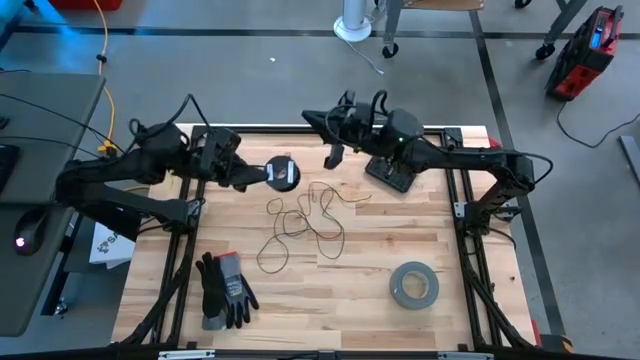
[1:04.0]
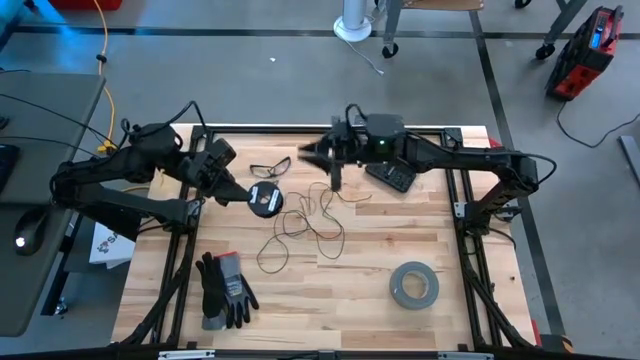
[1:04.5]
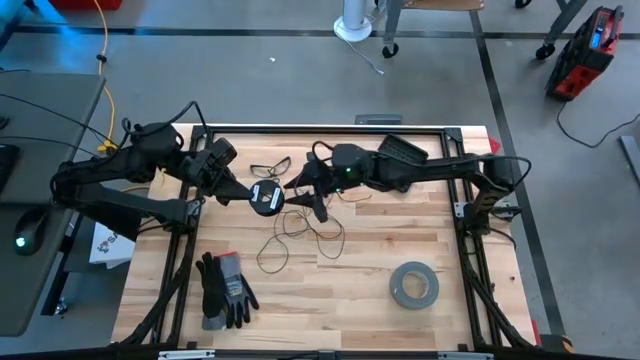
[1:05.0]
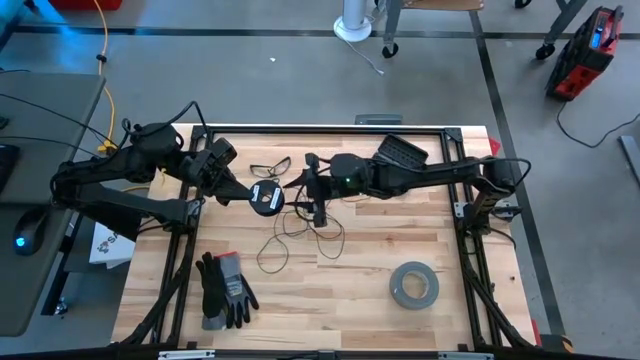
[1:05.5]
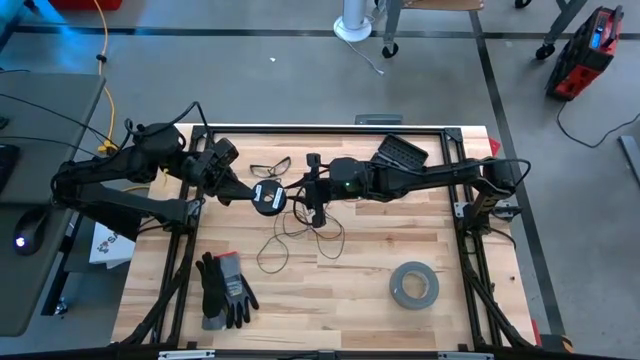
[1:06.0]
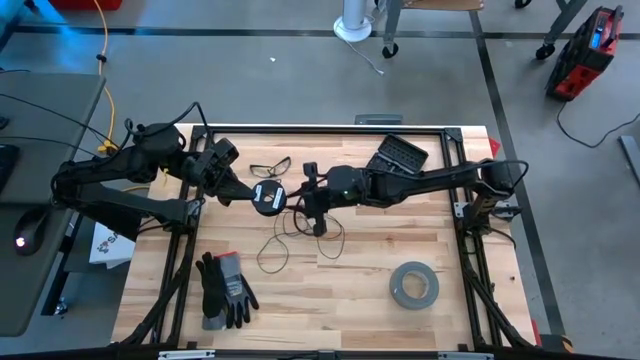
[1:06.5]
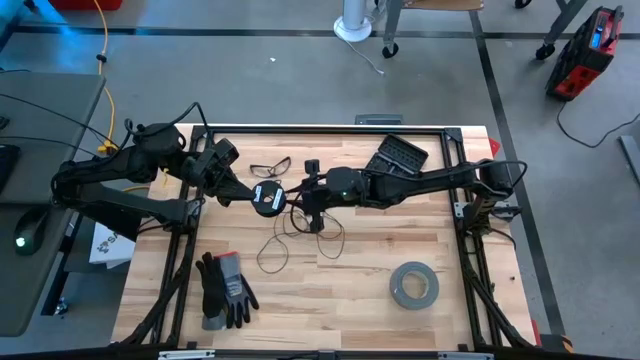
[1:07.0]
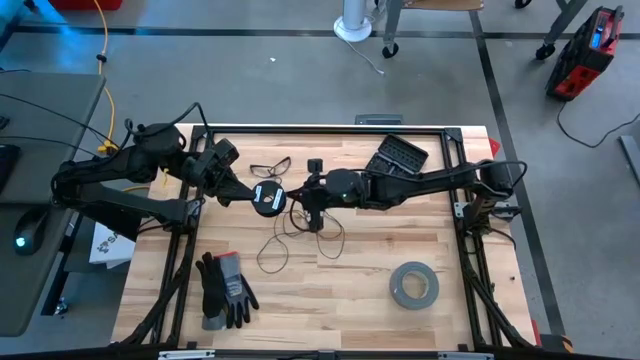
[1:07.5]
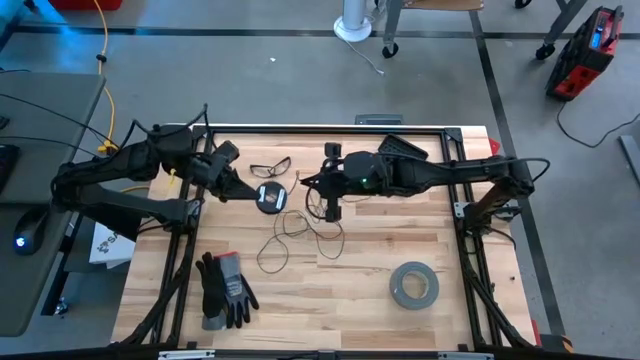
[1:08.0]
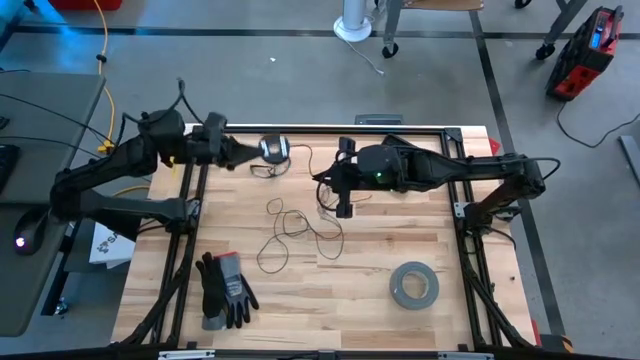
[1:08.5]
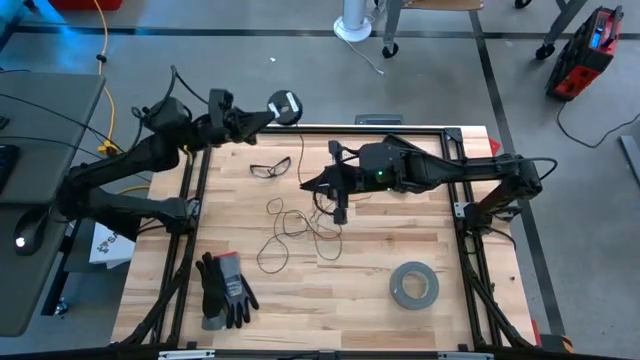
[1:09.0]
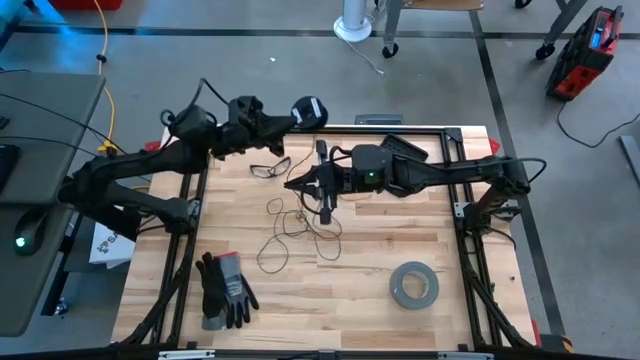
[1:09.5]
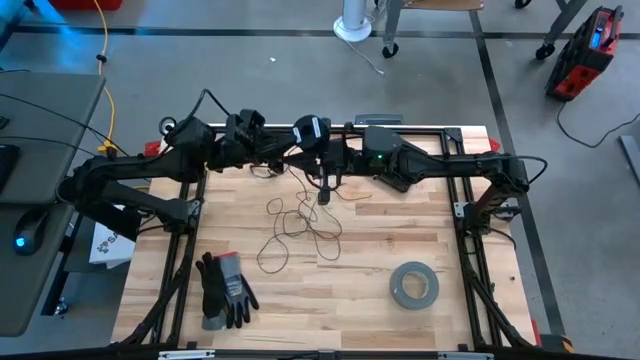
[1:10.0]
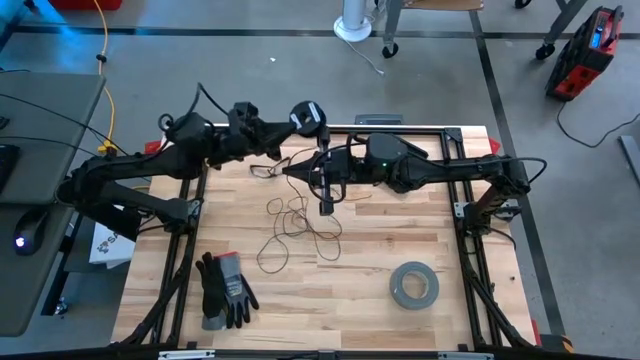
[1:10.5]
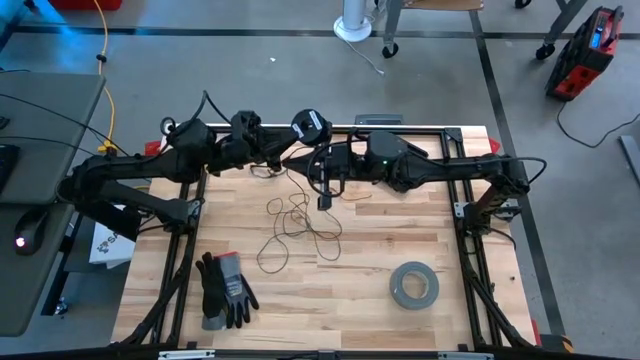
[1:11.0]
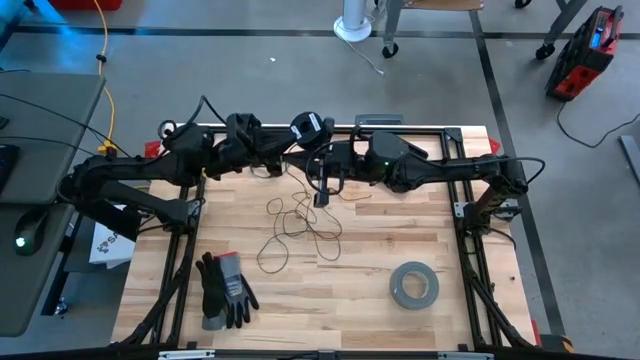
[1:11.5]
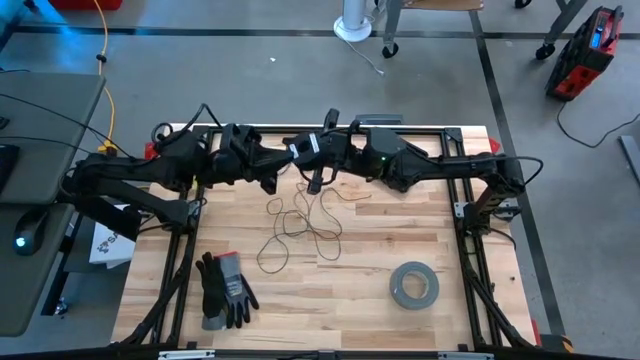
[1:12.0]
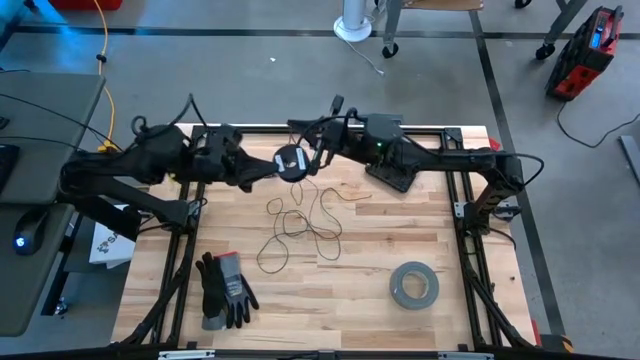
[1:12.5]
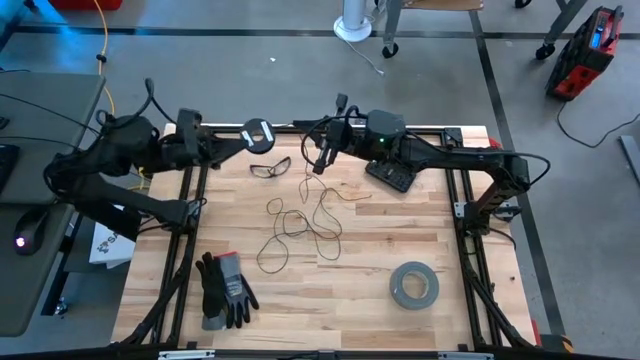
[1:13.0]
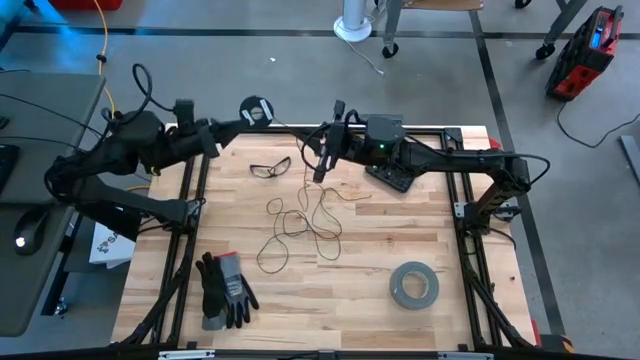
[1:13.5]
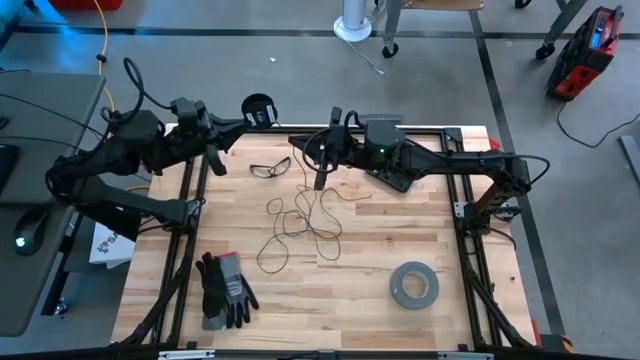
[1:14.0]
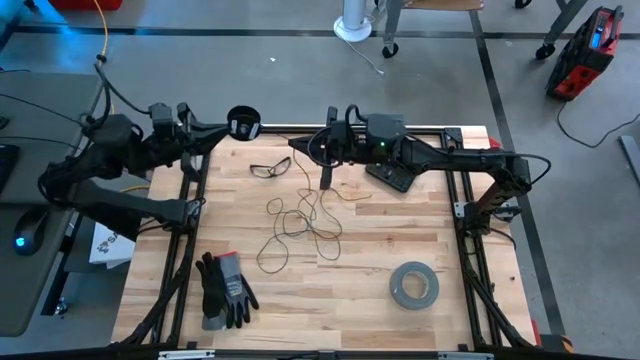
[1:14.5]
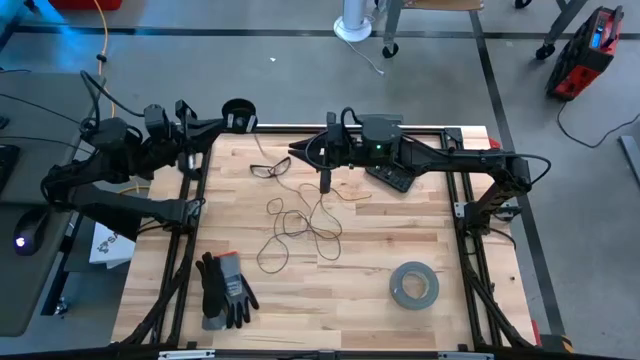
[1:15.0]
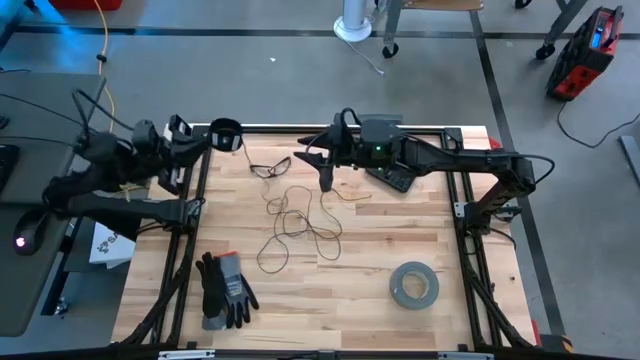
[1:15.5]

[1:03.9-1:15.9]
Task: Coil cords
Coil the black wire on the black spool

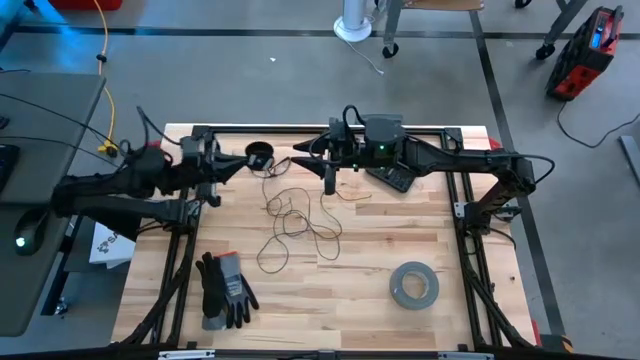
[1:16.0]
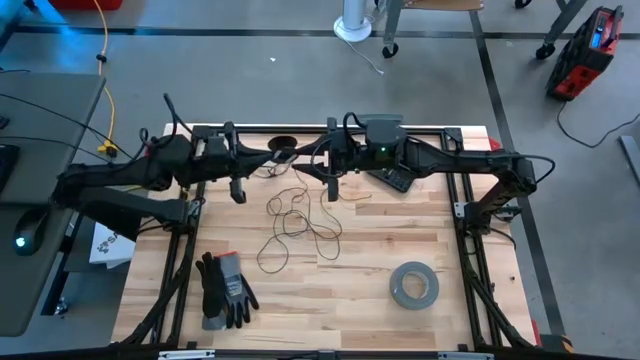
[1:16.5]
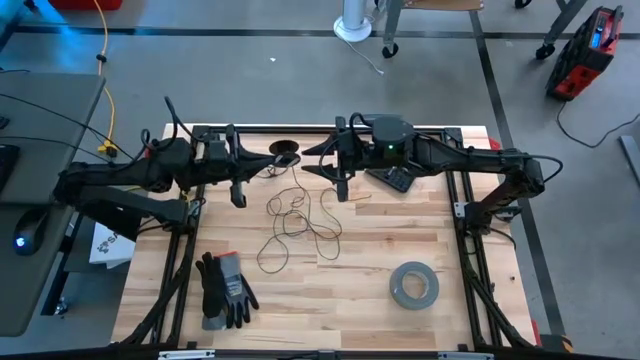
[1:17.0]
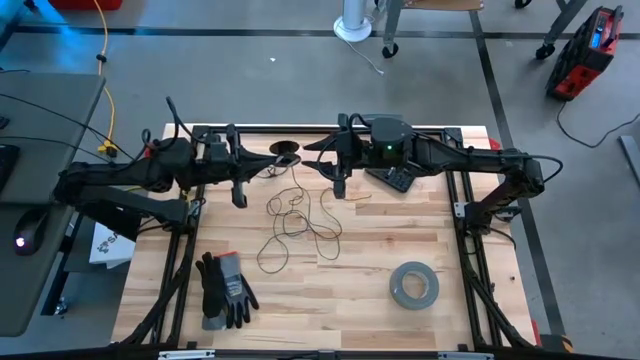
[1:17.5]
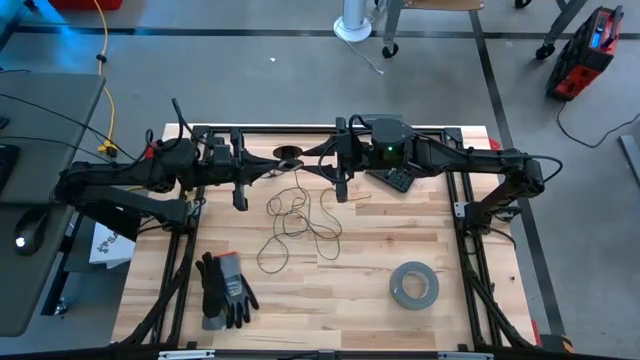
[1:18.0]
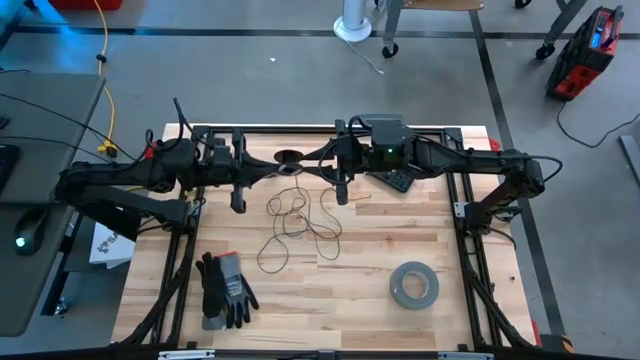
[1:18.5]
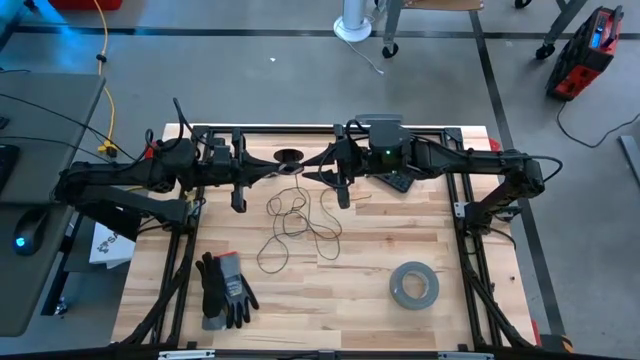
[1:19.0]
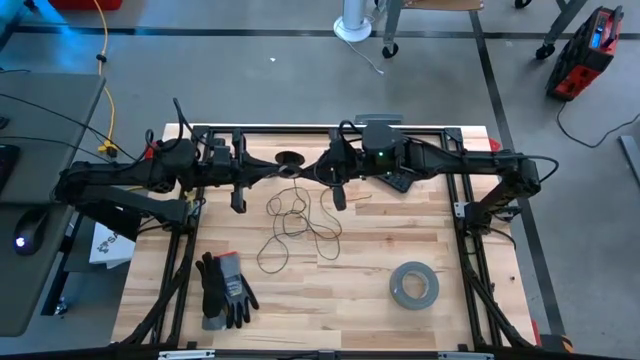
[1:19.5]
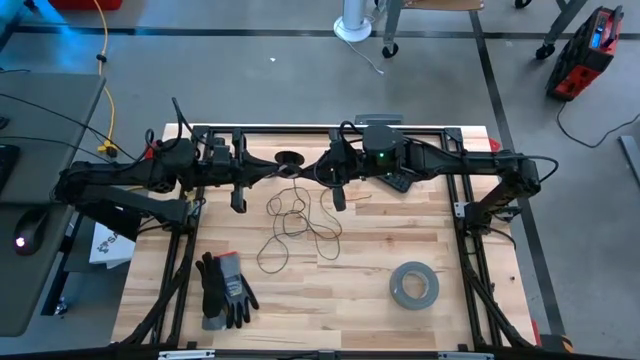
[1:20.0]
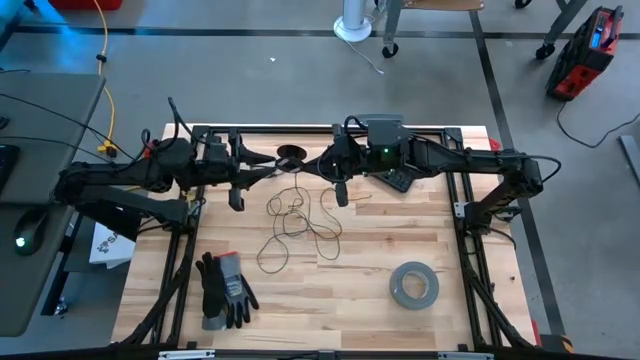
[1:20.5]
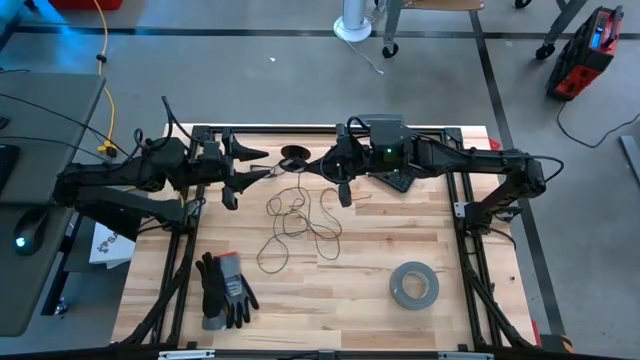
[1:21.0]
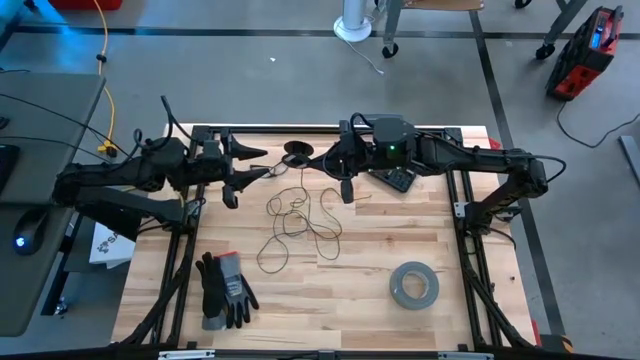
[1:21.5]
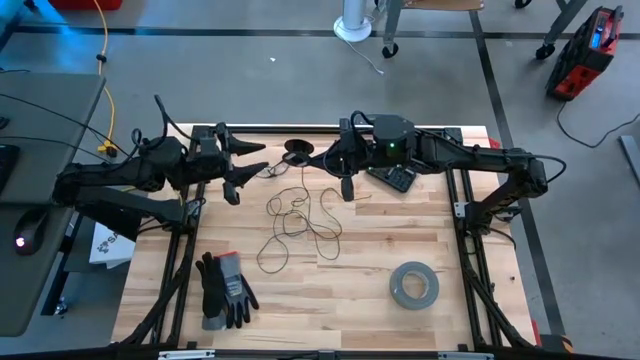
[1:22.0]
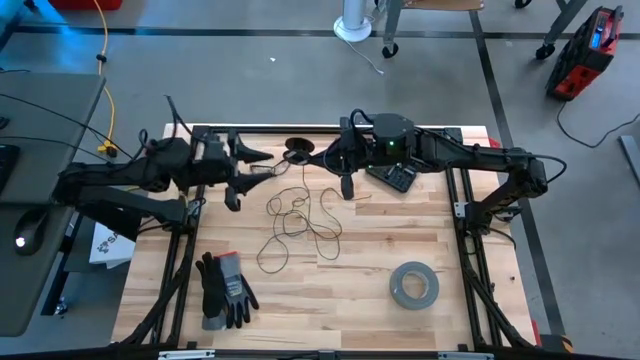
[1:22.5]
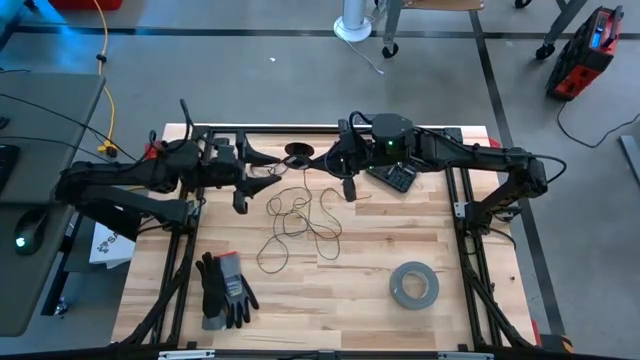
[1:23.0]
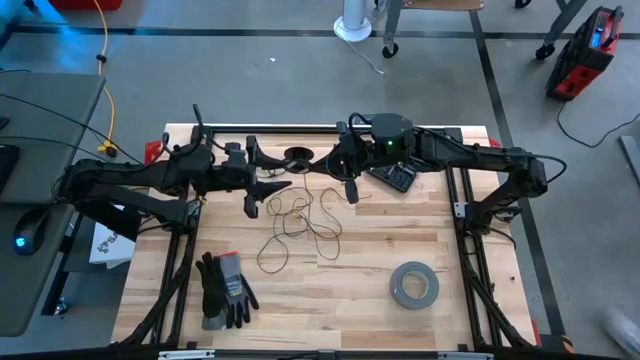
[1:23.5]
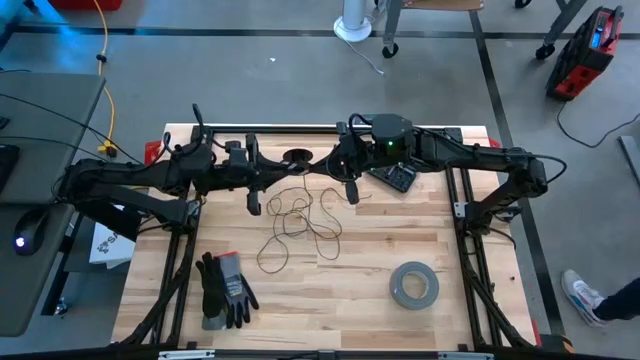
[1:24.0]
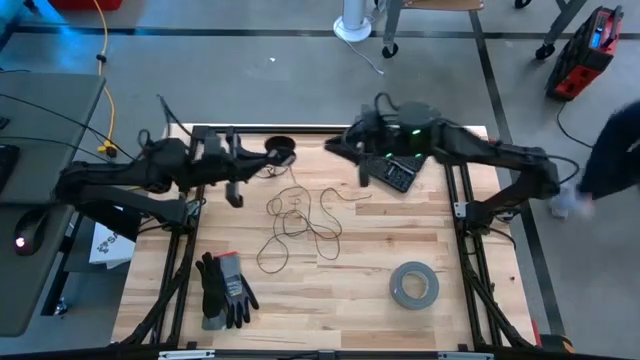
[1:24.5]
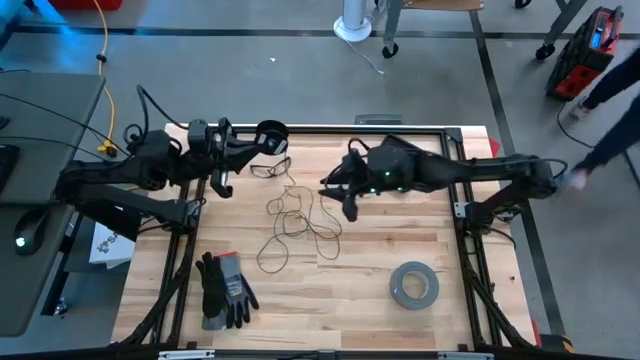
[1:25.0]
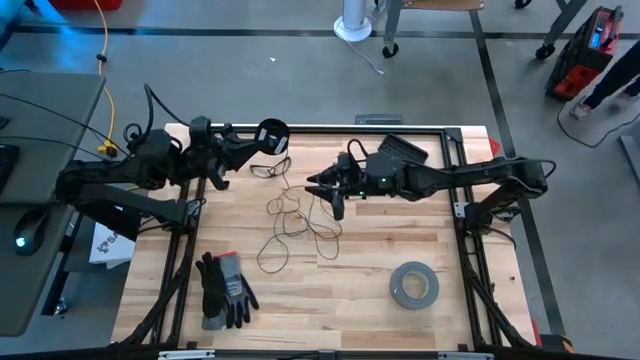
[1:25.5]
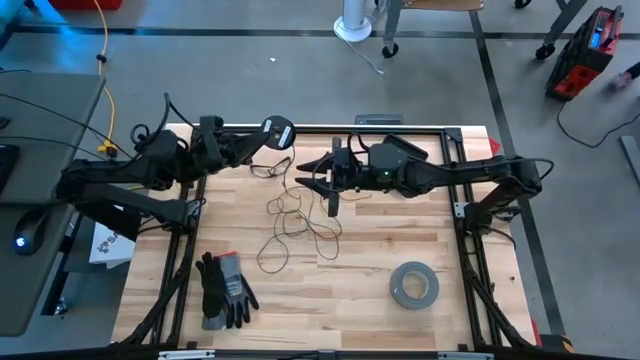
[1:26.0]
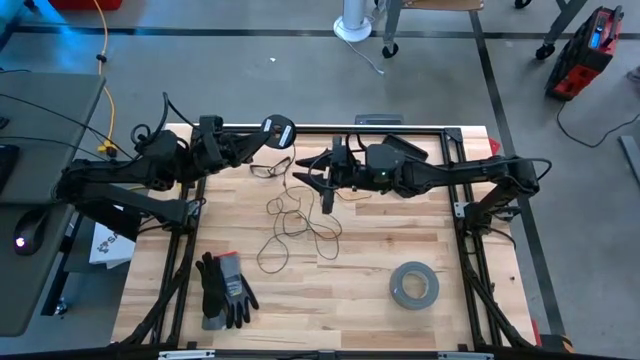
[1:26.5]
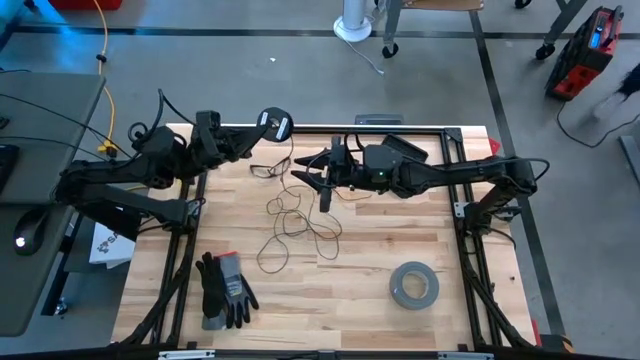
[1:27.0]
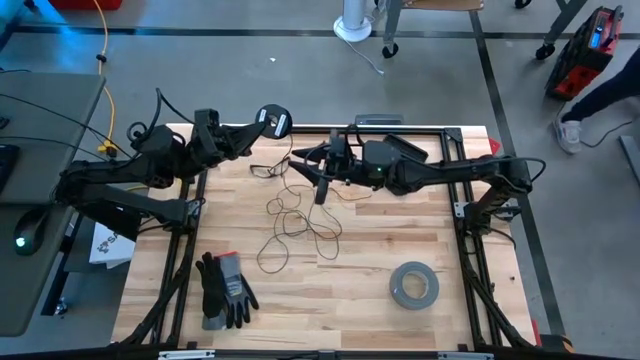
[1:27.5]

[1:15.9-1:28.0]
Coil the black wire on the black spool
